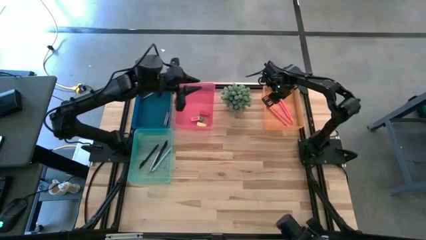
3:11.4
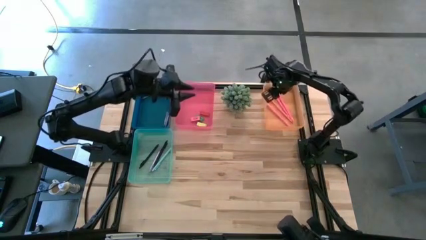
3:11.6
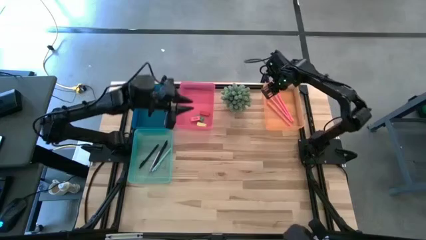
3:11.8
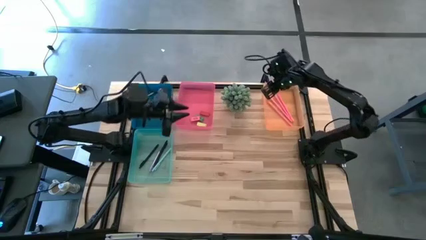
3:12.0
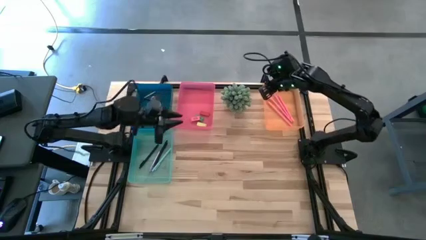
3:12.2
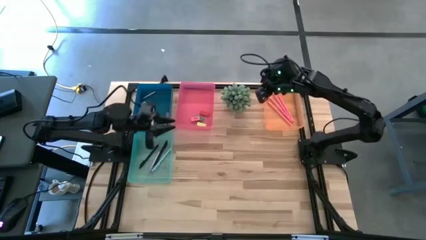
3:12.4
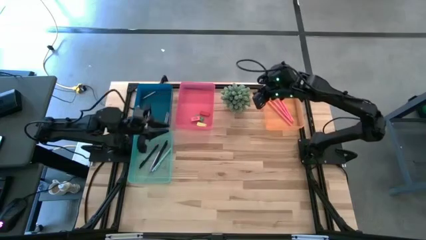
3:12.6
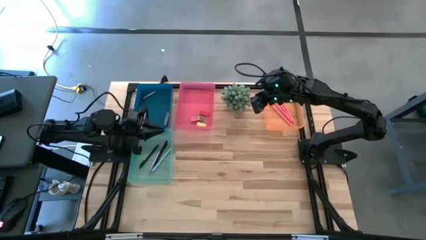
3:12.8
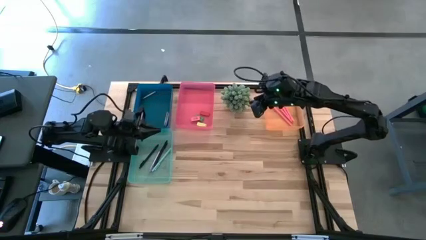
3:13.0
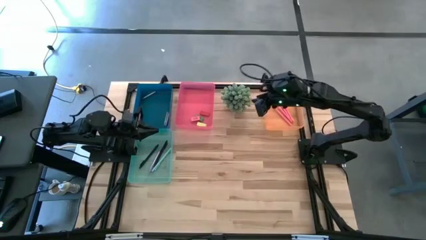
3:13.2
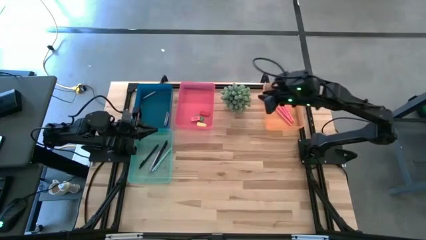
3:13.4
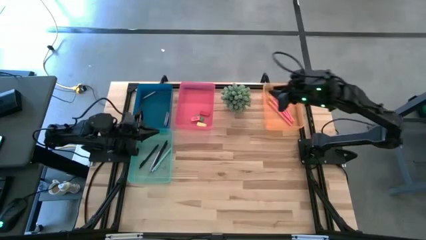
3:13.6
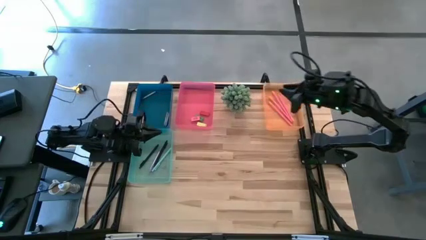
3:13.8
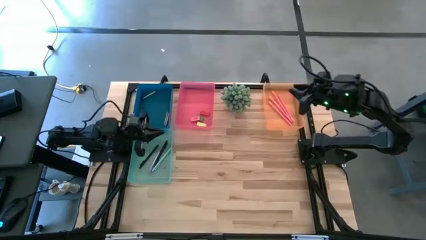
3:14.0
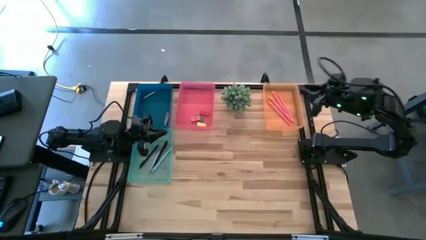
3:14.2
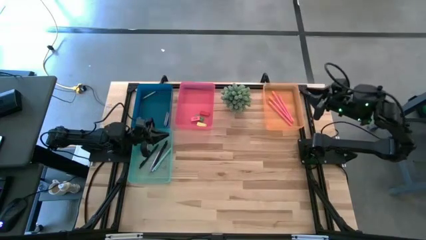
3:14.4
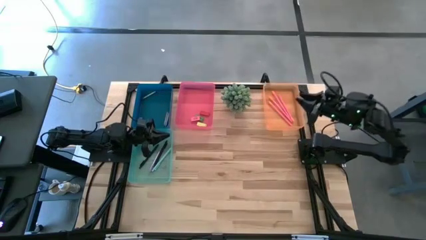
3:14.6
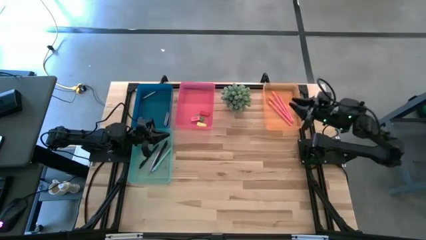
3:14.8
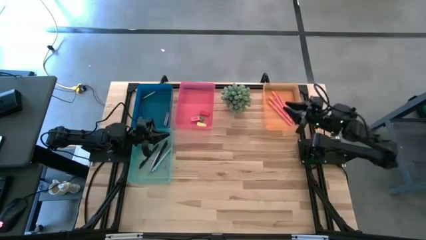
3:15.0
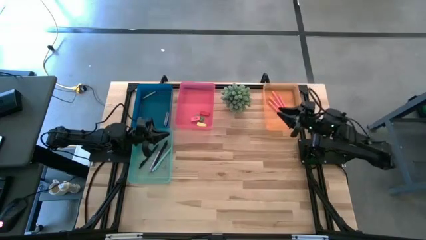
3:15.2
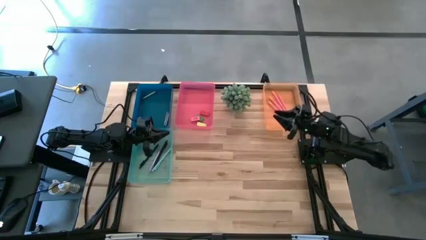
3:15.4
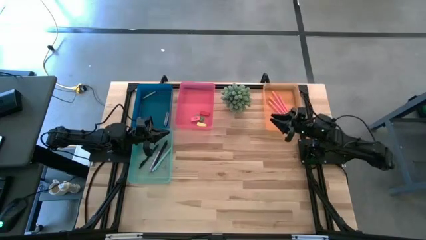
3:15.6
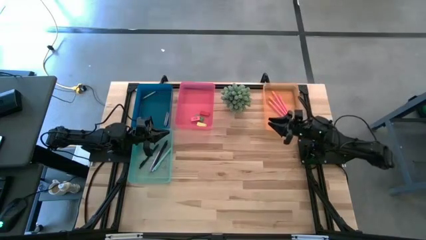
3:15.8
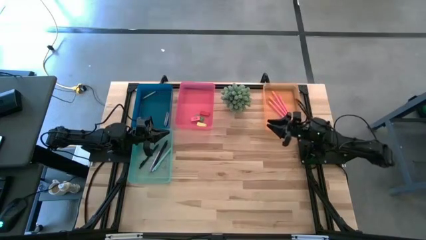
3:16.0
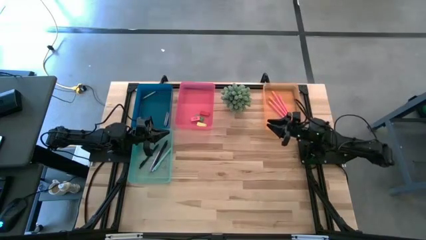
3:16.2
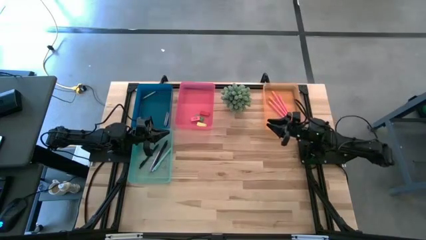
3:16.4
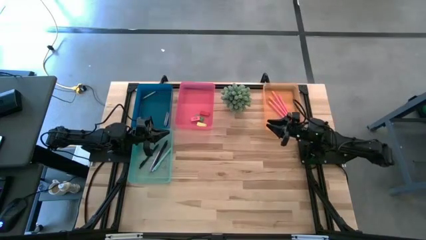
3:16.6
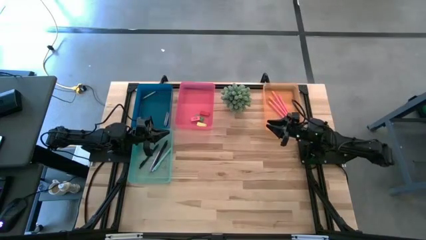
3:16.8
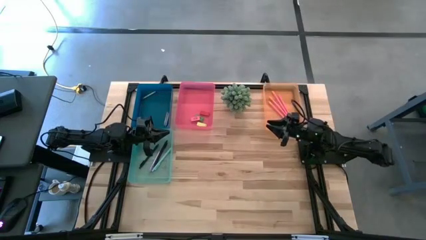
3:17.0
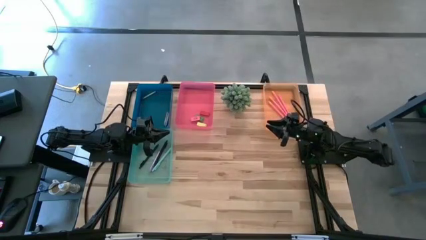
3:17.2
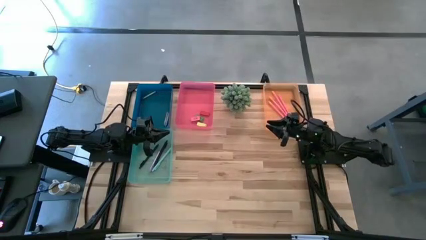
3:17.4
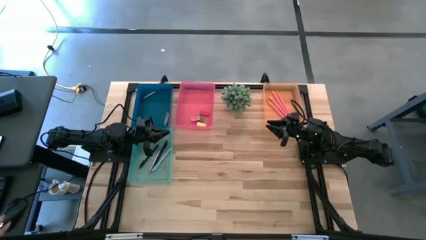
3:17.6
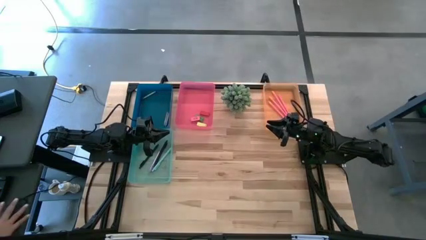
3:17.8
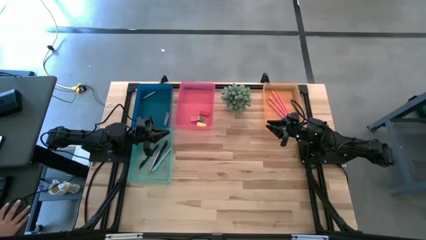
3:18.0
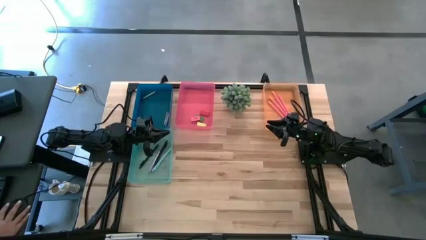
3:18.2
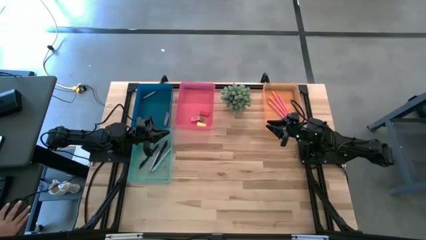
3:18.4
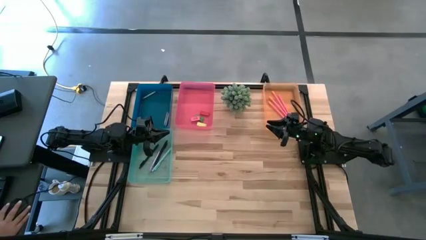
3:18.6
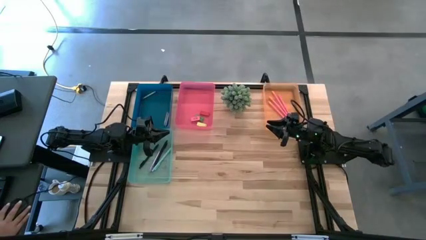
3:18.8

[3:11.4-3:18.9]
Task: Sort crayons/erasers/pens/pencils in bins
Return to Home Position

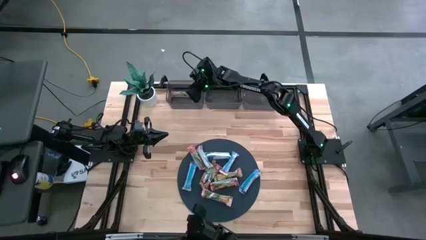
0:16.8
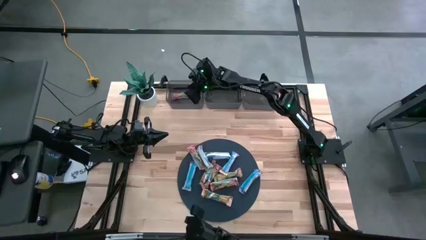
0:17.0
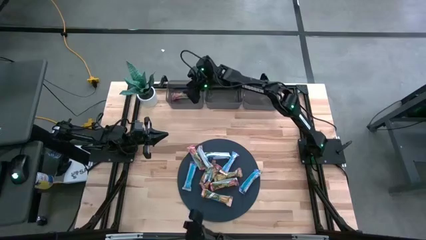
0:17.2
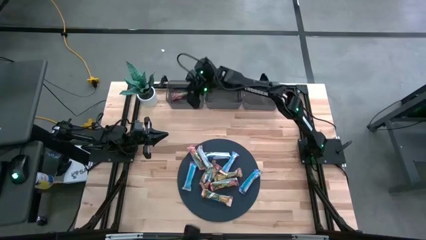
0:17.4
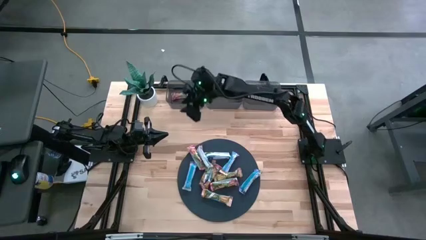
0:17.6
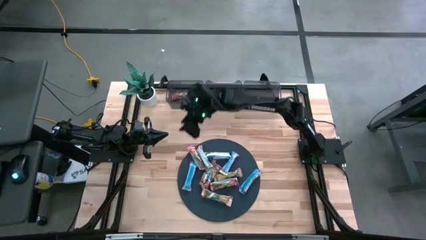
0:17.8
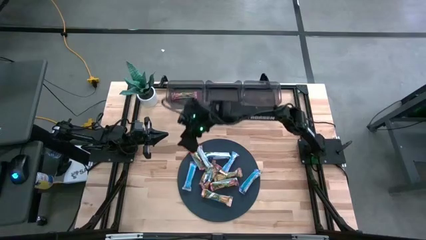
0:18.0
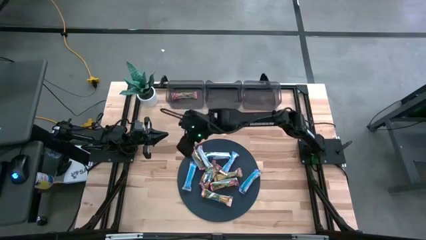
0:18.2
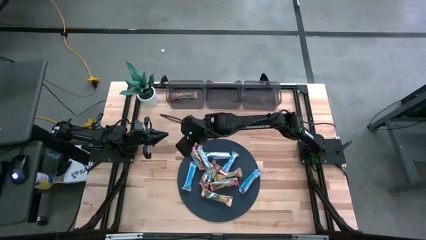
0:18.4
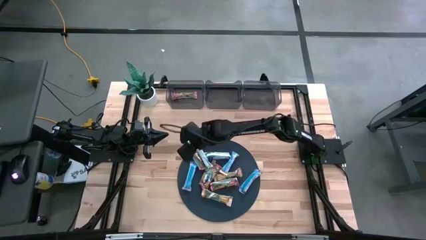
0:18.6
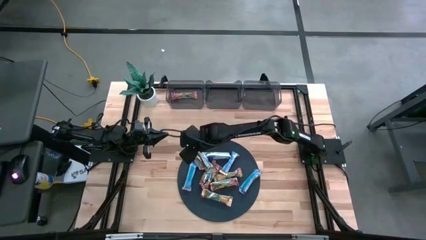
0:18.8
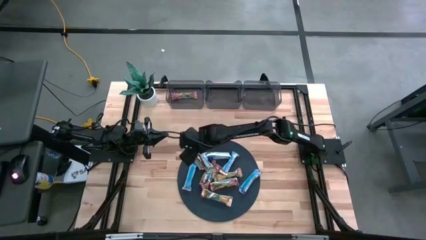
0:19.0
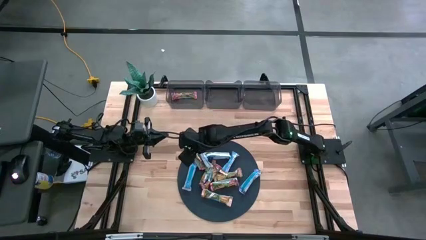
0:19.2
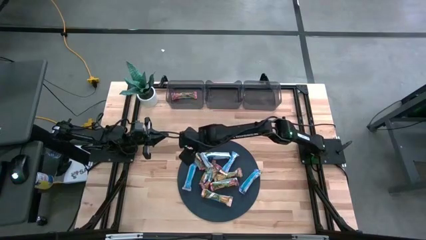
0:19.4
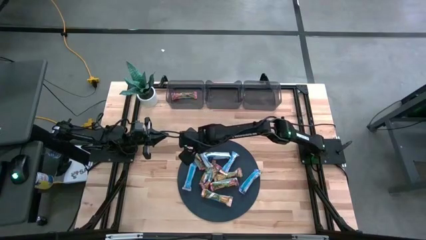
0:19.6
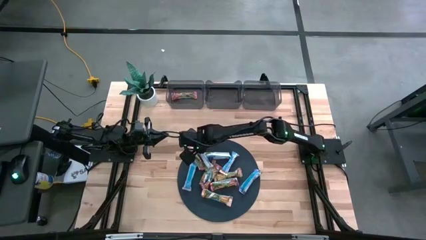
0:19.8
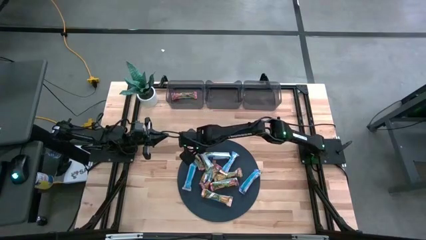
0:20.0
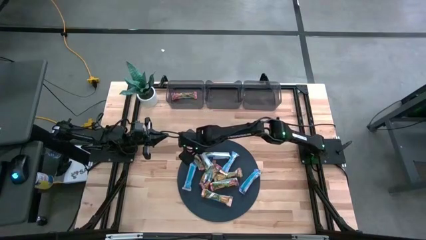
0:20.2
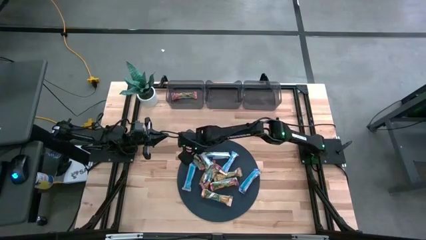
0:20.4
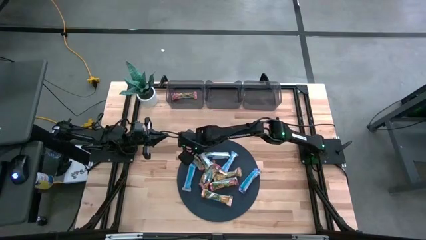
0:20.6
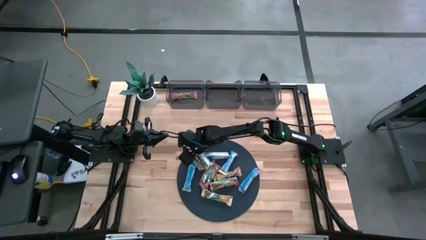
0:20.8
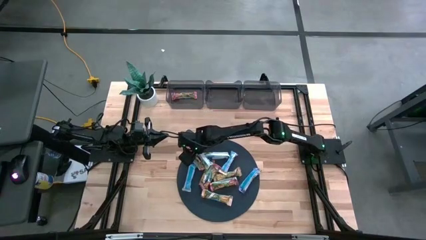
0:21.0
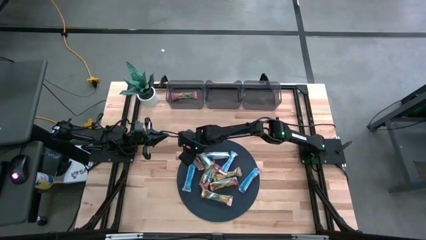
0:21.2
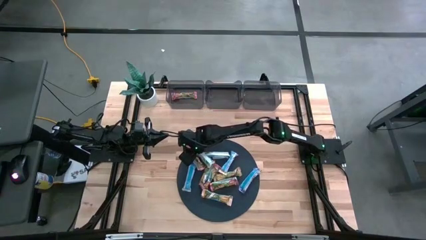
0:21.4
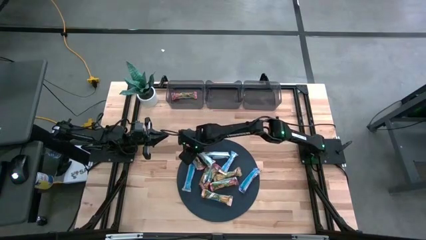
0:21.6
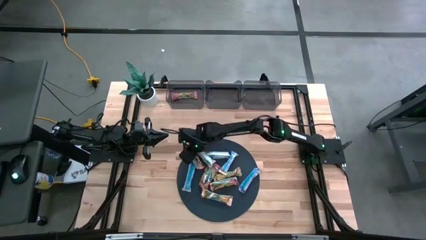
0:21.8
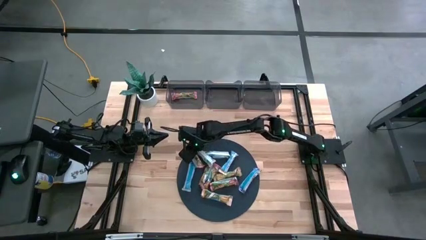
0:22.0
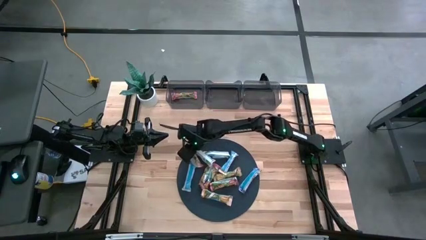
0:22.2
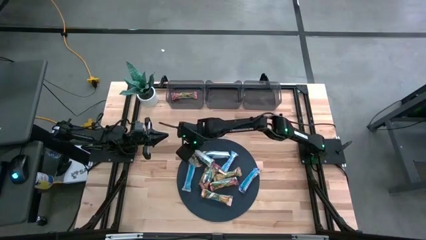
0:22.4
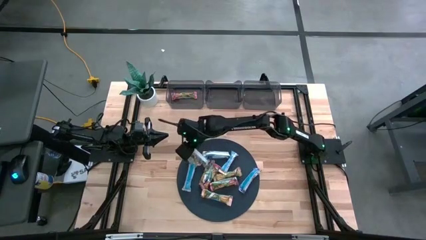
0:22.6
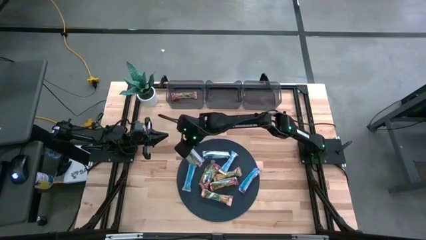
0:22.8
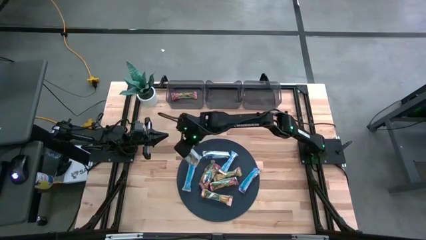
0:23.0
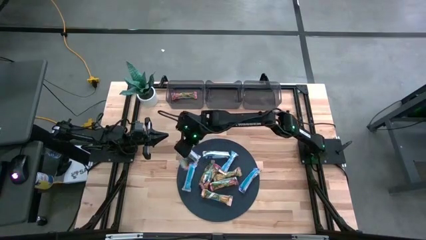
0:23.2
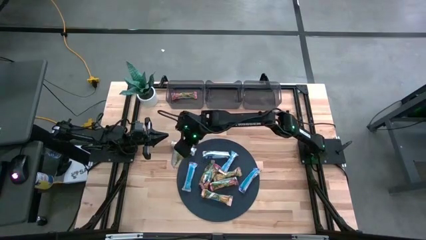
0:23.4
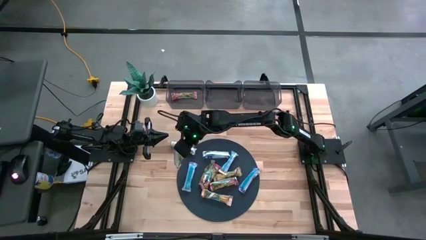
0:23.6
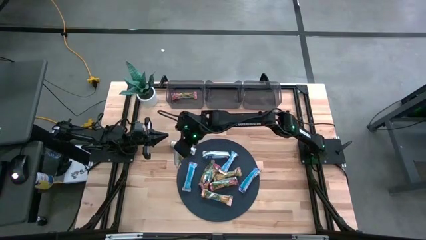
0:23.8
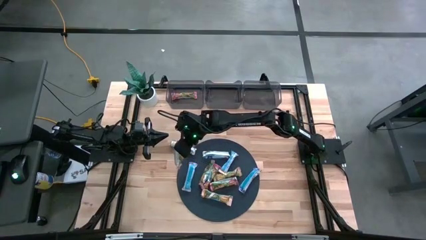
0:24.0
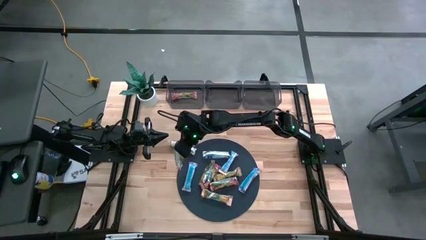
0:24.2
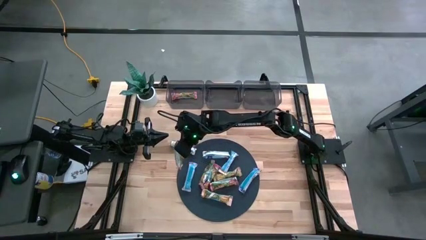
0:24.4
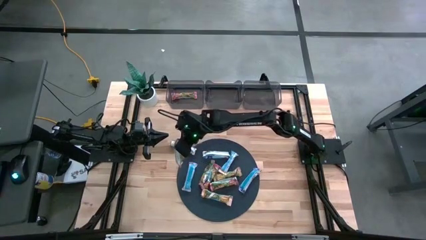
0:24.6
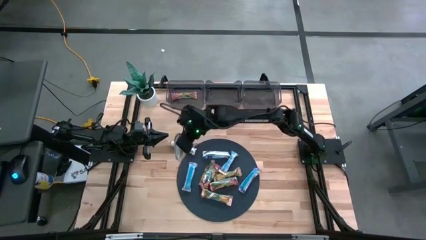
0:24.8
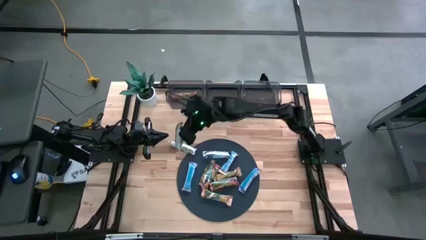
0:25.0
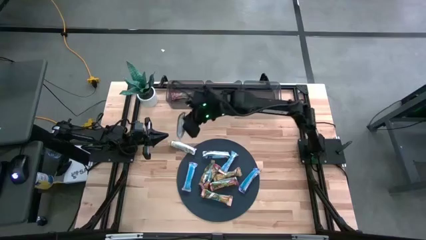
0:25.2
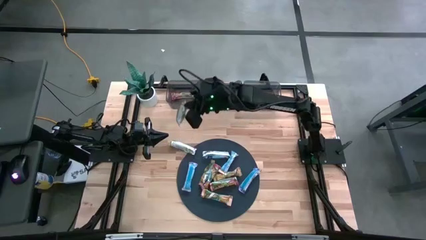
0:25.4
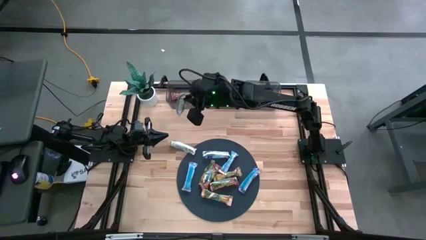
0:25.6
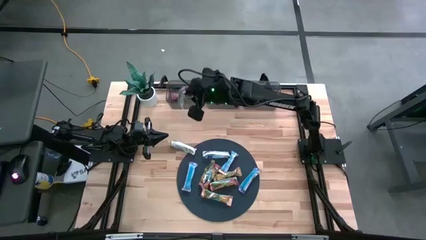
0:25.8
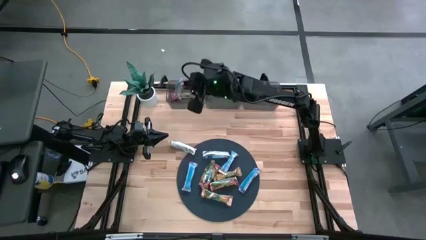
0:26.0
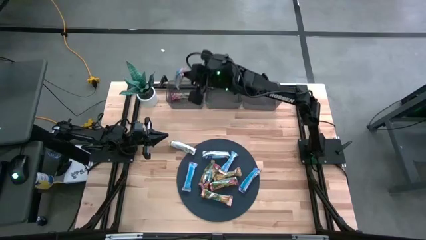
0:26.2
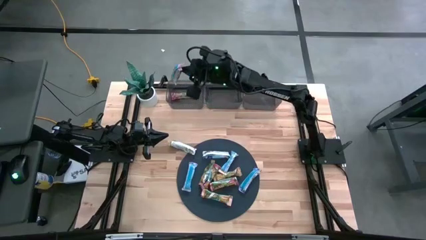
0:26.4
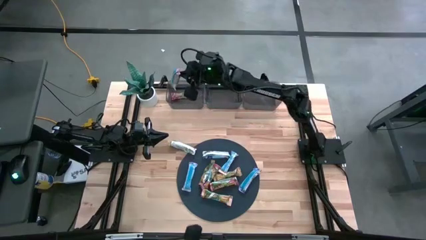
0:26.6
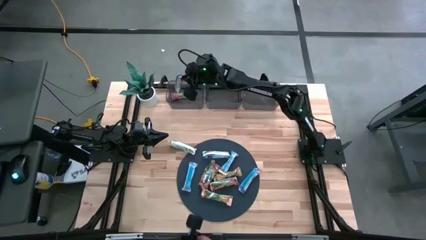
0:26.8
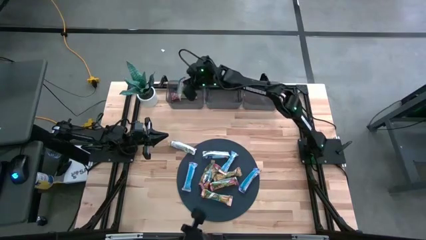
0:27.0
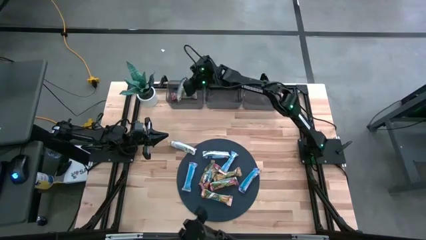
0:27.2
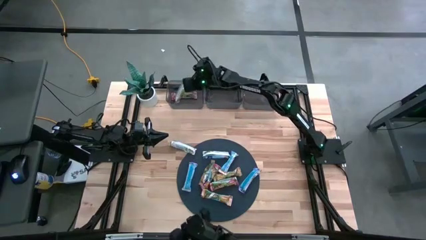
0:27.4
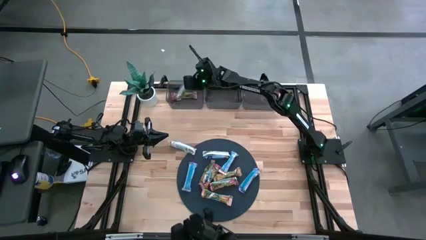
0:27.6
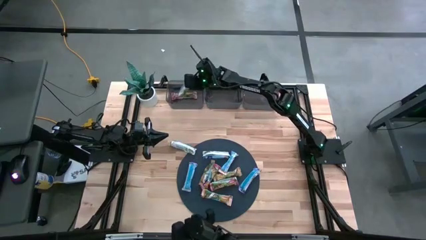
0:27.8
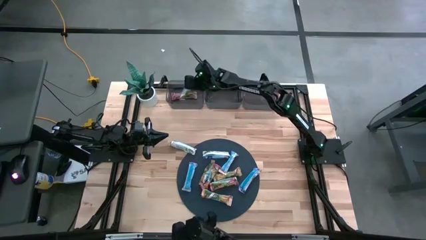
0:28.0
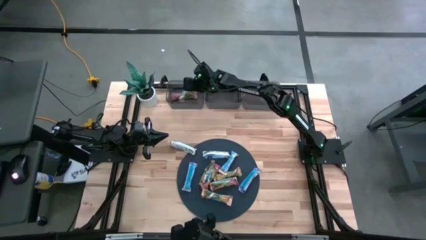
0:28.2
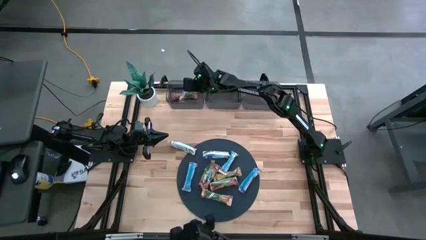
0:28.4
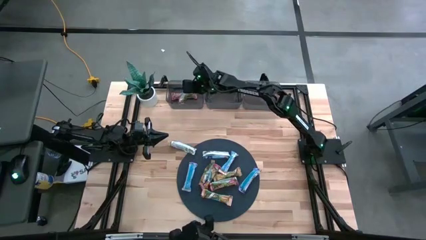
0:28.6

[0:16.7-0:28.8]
Task: Pick and place Granola Bars by type
Put the red granola bar into the left black bin
